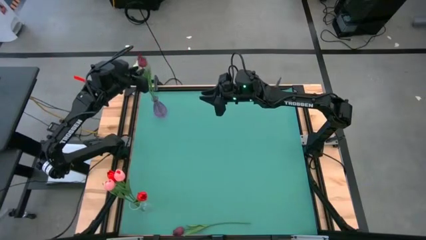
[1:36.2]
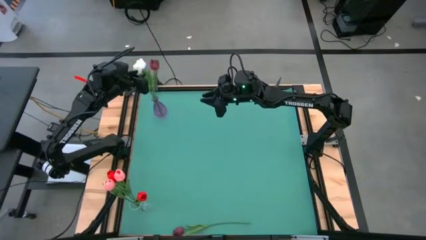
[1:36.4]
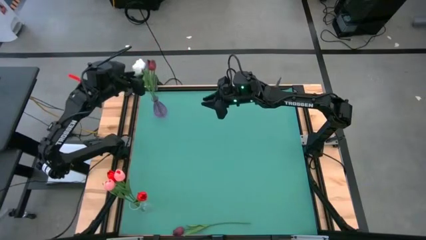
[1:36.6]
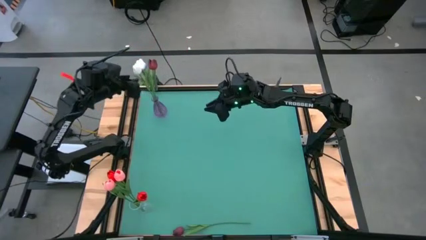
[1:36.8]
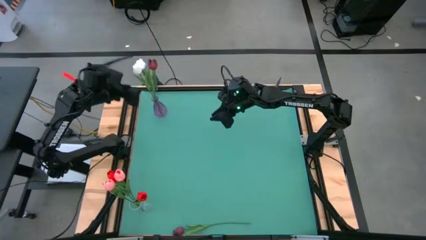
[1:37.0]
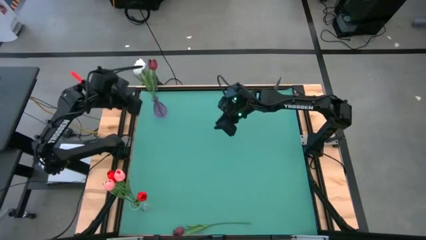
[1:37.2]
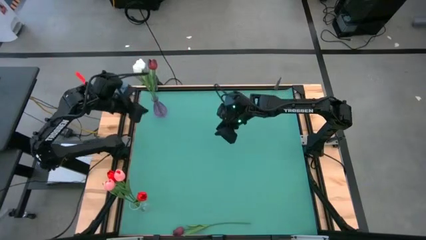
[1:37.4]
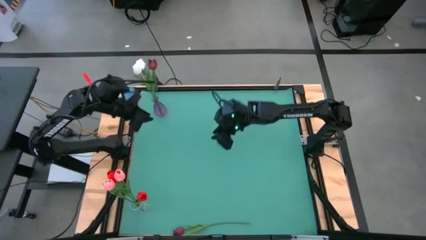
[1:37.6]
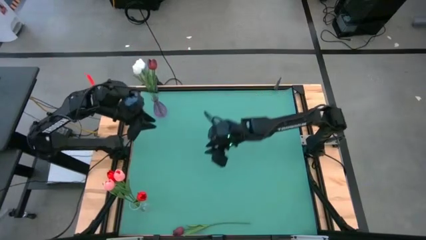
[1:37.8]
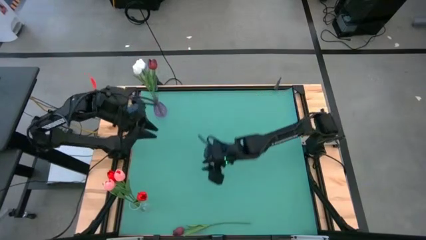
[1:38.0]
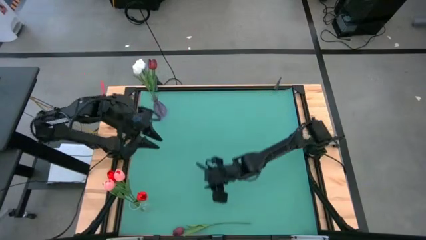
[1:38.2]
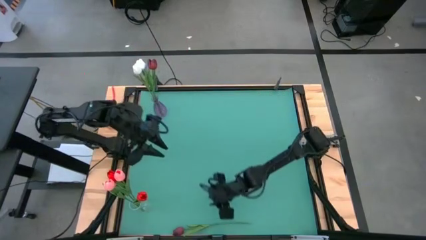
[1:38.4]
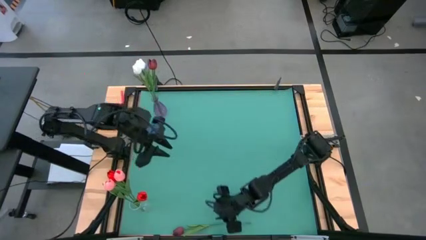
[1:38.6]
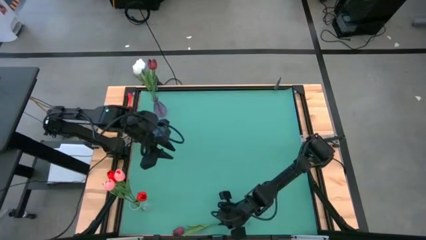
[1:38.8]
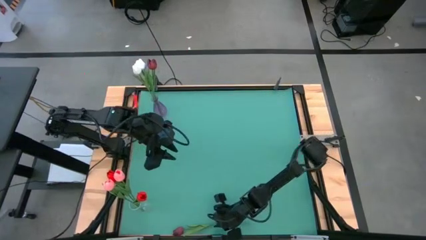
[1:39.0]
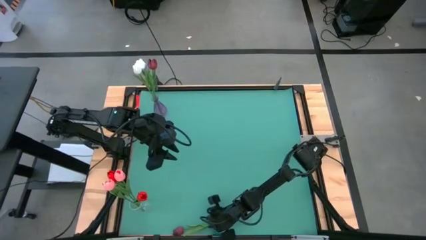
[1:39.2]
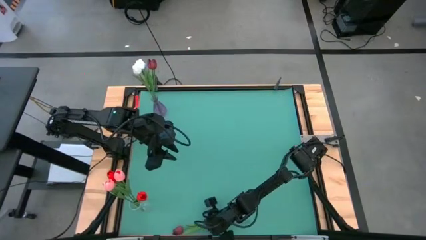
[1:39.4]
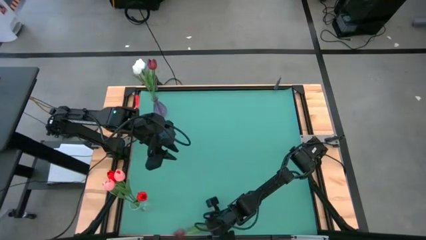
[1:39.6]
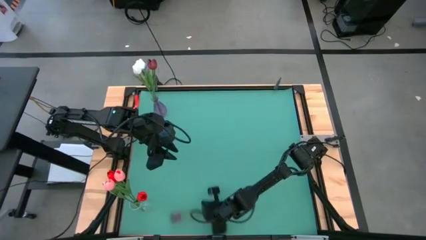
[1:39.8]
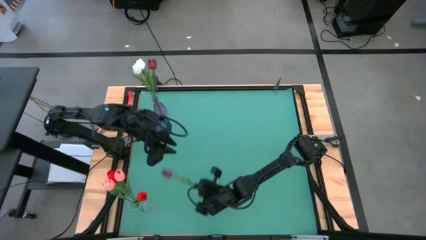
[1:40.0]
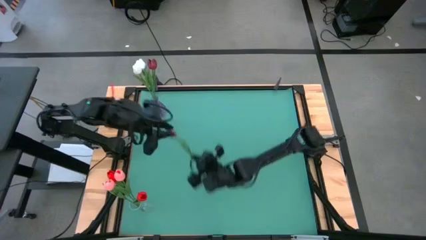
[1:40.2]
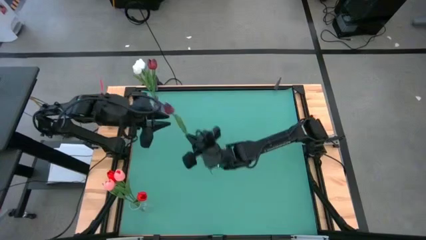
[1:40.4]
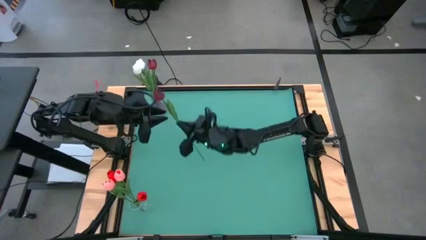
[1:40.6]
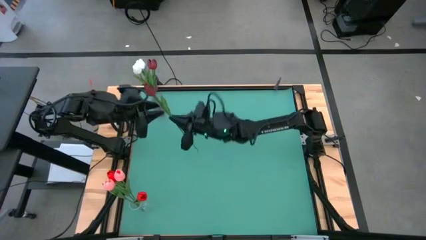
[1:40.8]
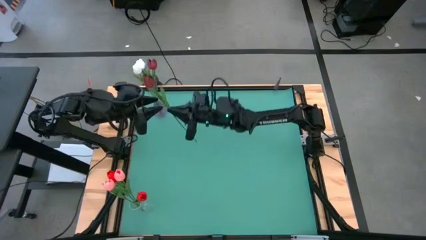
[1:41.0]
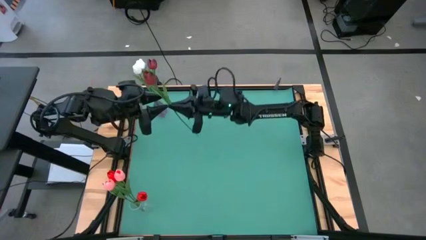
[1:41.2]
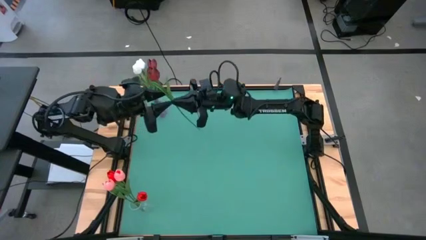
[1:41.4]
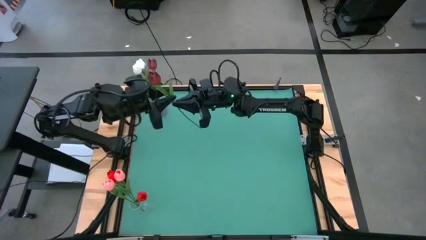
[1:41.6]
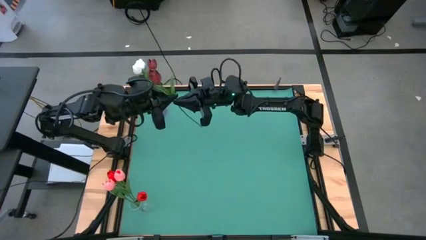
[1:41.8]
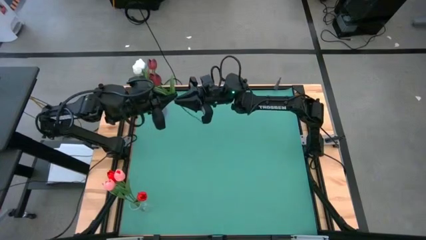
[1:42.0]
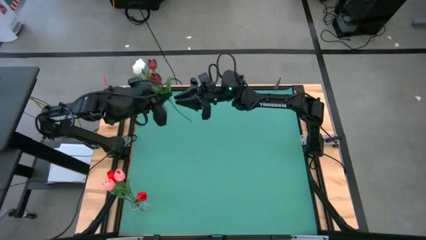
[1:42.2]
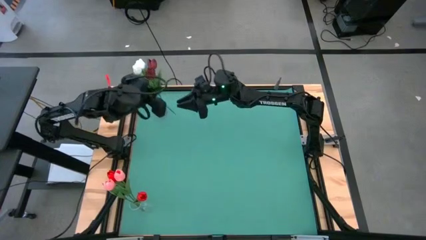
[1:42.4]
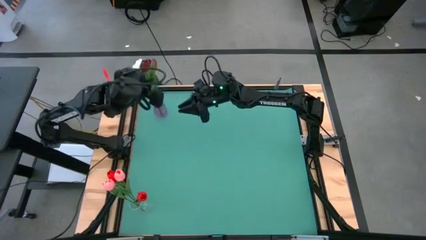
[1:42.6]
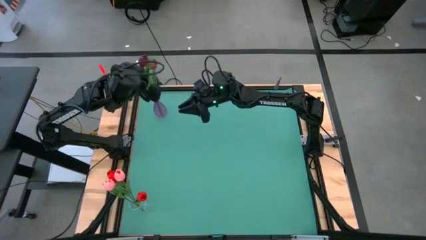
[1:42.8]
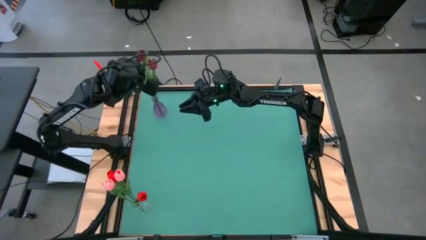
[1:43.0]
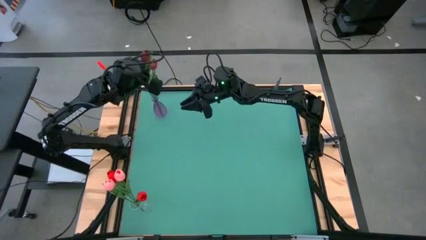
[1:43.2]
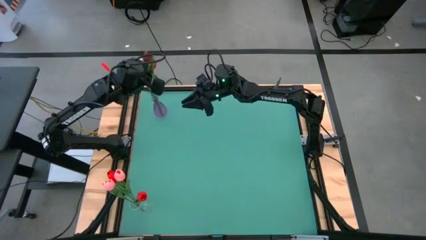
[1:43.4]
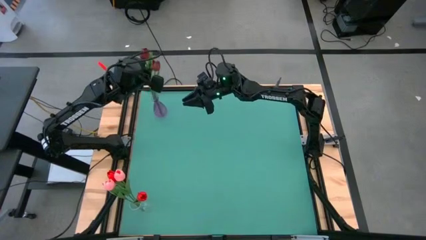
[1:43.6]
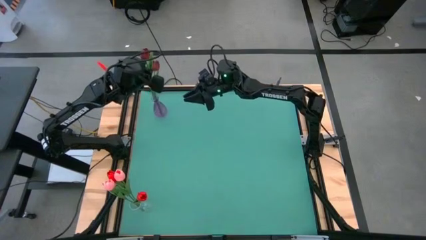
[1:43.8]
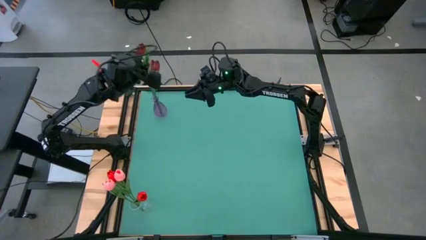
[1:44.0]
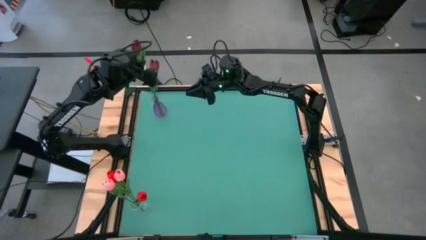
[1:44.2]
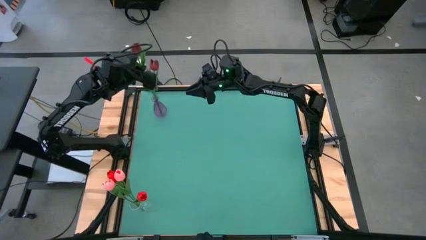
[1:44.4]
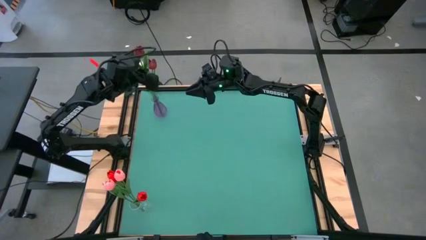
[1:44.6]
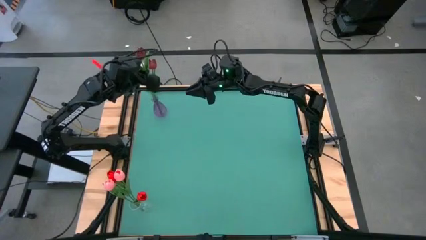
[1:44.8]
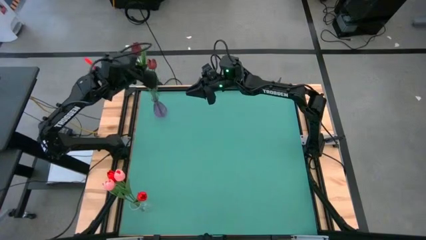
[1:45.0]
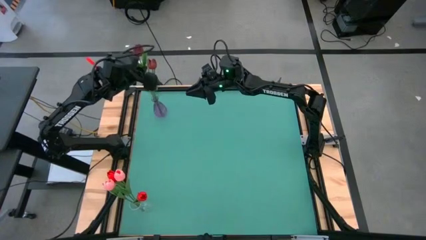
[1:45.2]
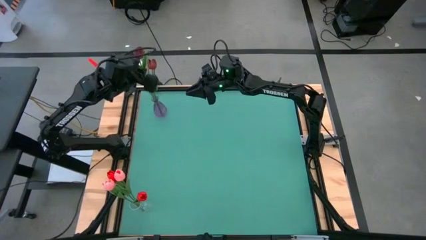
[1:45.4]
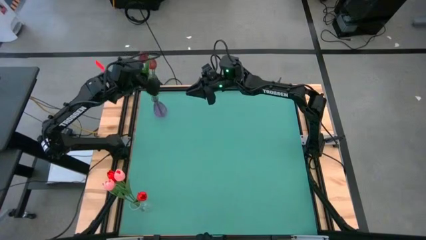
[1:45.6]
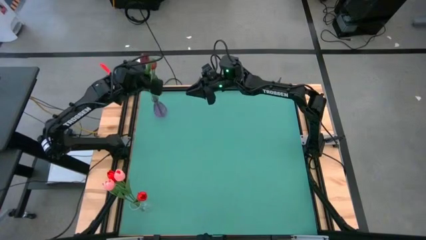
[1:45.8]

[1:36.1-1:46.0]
Task: Sort flowers into vase by color
Put the dark red flower into the violet vase

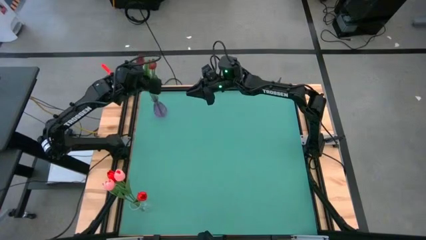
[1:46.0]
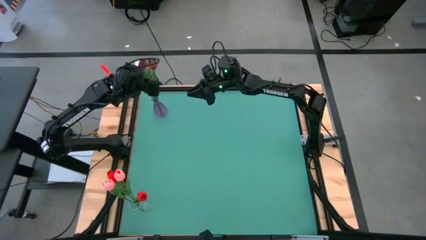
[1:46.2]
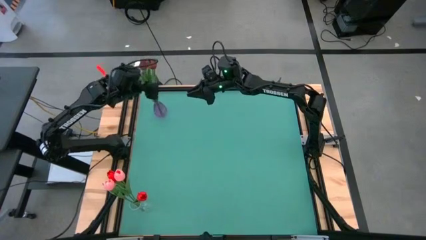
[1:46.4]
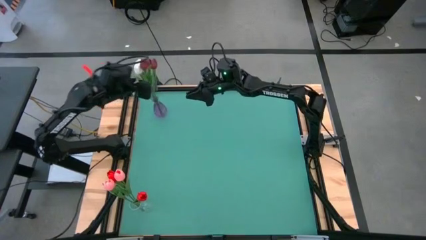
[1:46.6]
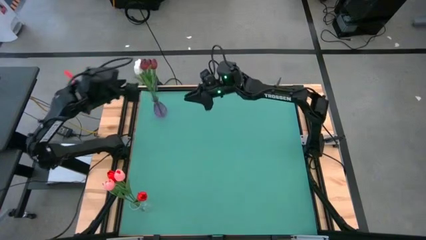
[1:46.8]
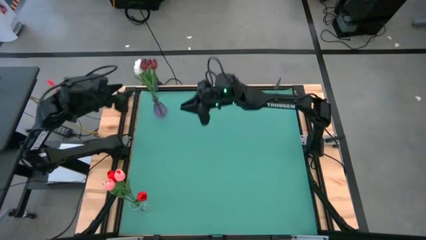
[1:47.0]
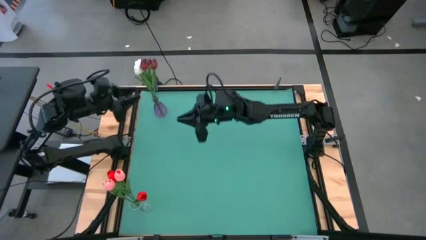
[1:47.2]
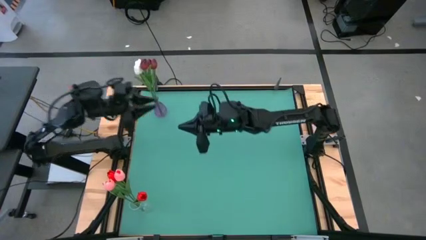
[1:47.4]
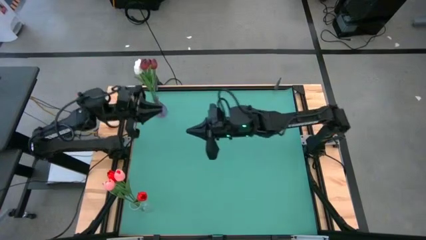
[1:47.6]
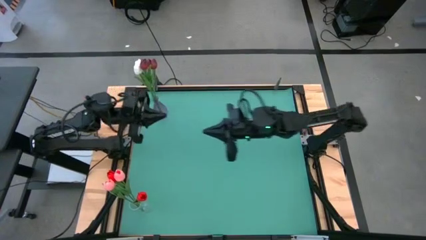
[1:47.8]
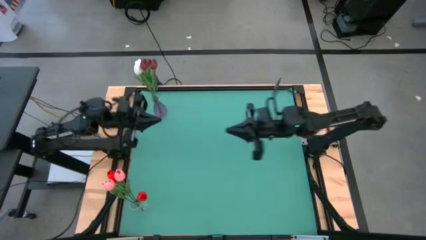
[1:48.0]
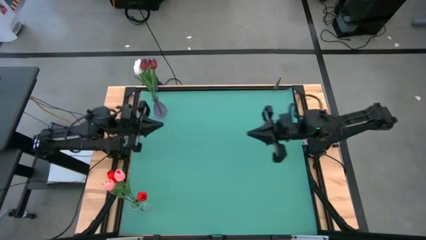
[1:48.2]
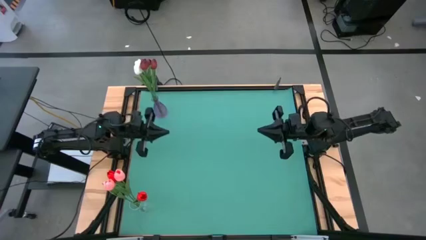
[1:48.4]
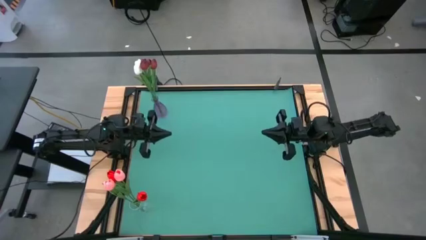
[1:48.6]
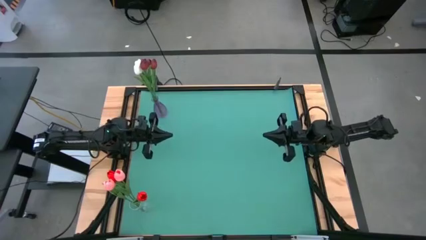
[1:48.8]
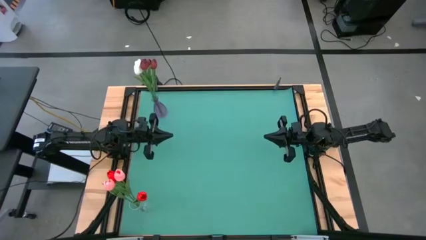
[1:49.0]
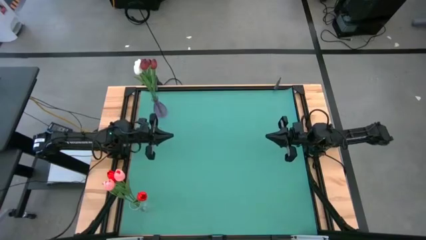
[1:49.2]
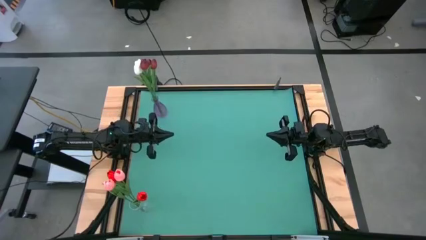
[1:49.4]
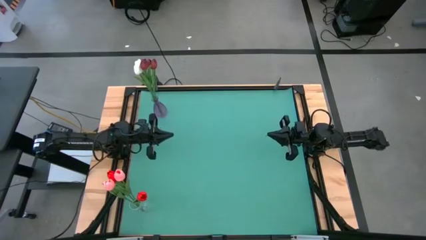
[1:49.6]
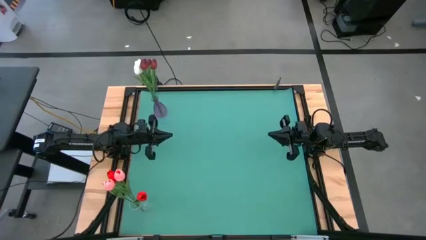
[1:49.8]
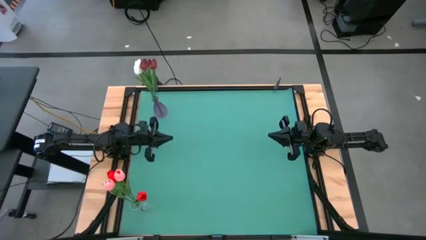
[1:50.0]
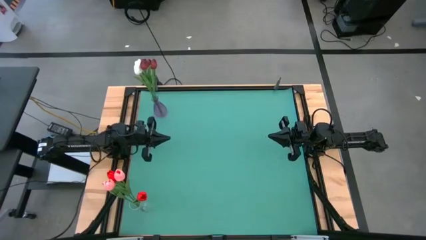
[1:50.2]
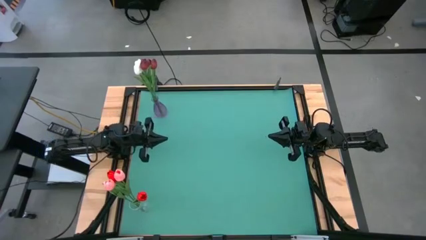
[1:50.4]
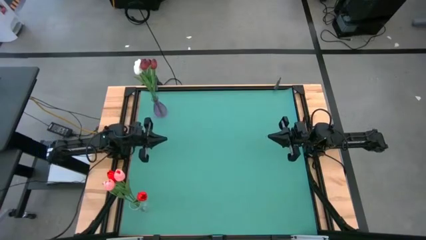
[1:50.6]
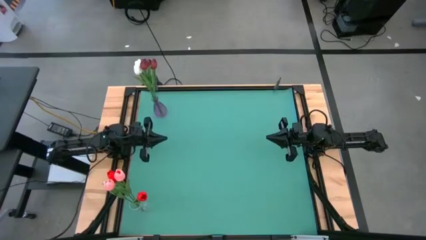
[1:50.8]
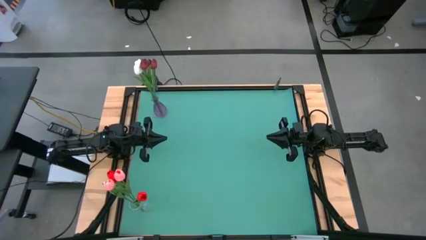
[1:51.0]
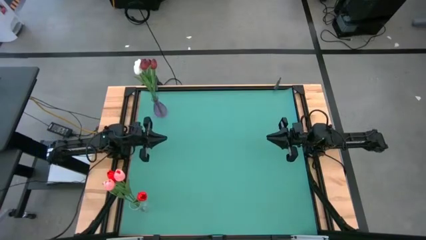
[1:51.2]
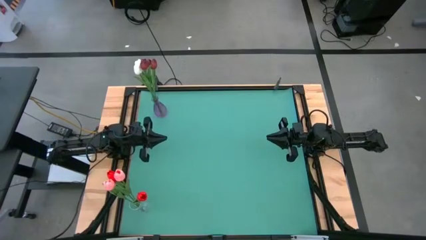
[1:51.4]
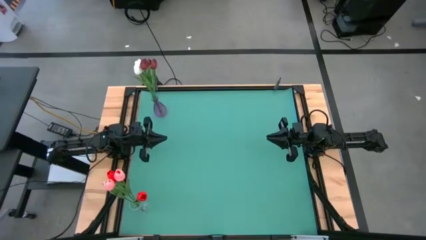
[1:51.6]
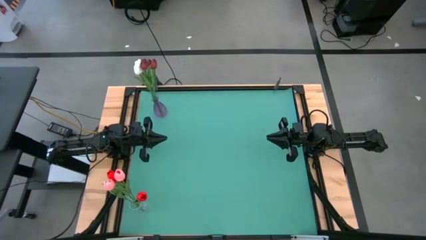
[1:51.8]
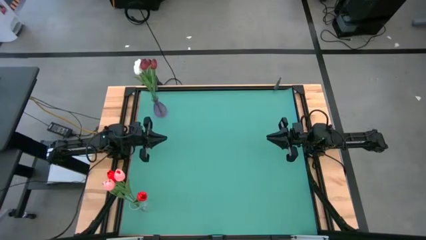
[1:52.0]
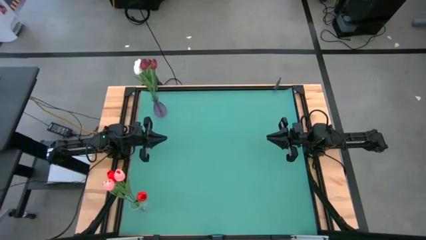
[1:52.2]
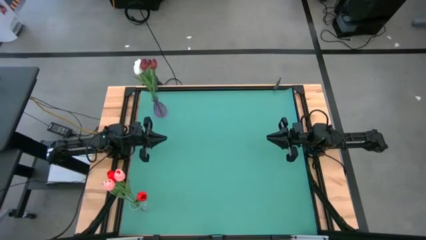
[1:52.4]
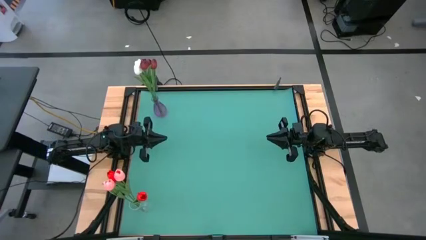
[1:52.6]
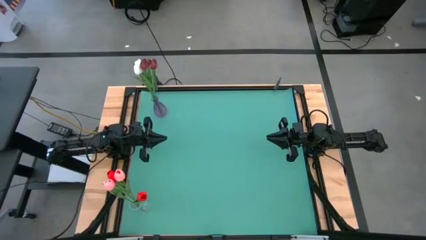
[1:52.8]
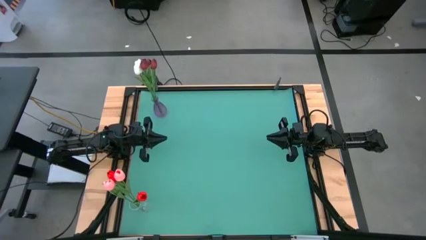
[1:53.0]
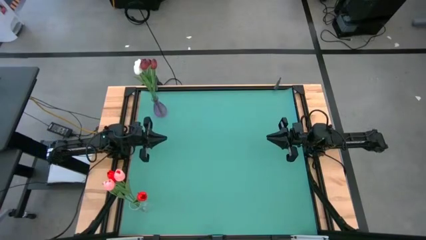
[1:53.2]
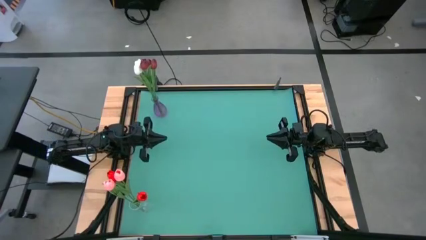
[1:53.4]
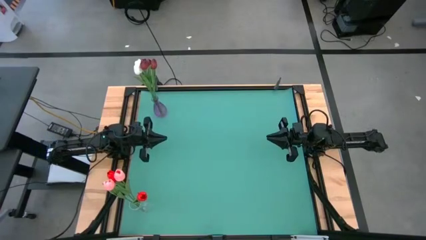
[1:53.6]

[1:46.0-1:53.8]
Return to Home Position

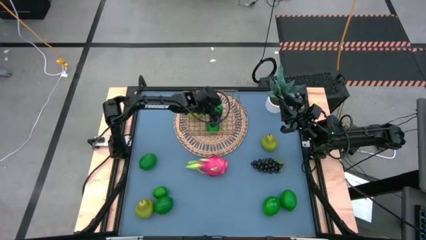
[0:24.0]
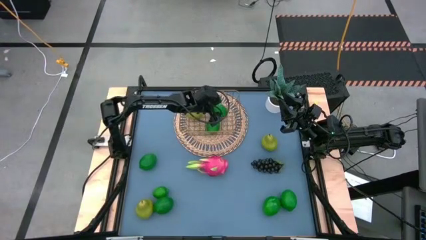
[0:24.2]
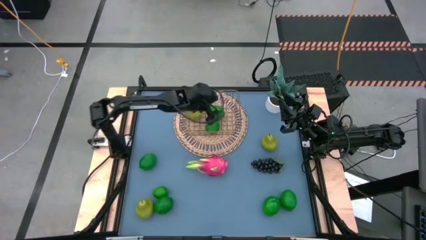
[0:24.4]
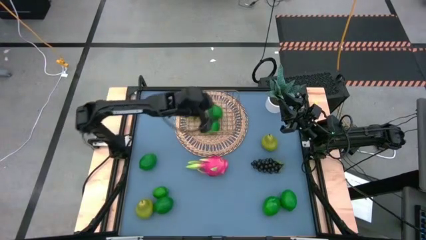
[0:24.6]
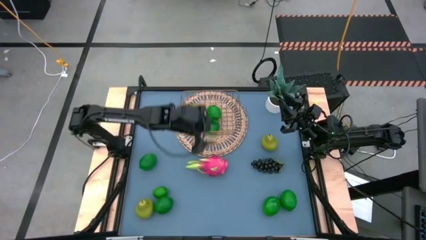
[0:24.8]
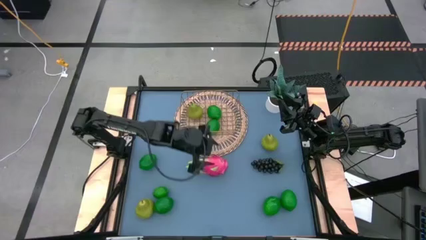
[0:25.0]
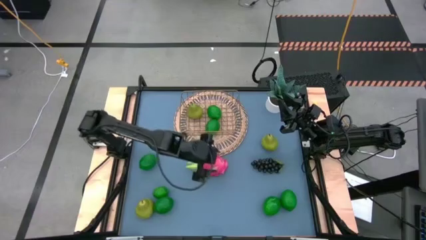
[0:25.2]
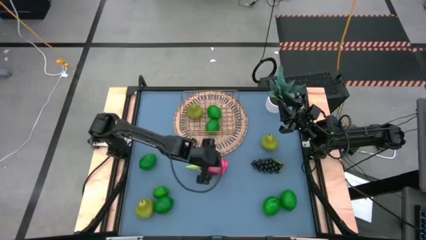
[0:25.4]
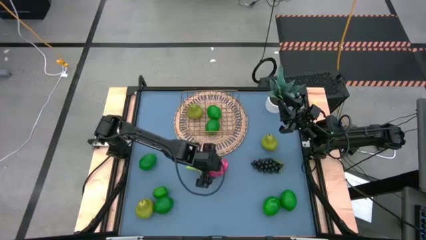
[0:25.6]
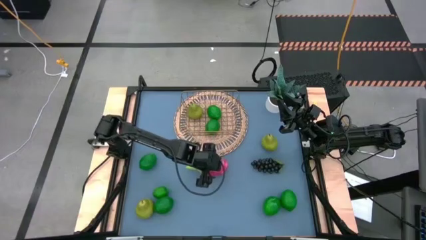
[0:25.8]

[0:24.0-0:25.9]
Task: Build produce basket
Put the red dragon fruit into the gold wire basket
